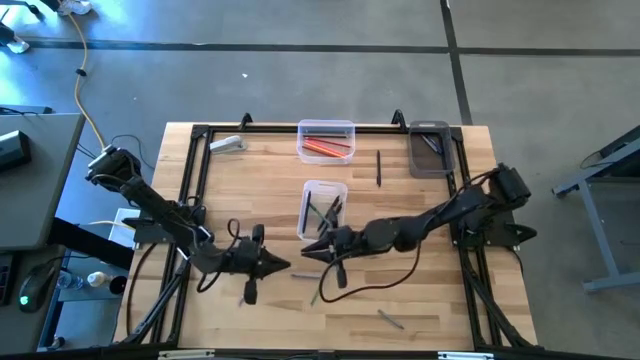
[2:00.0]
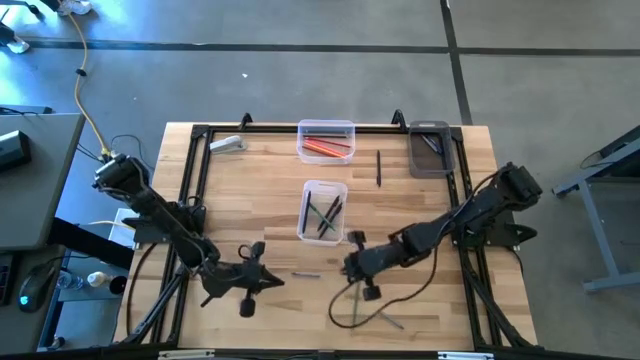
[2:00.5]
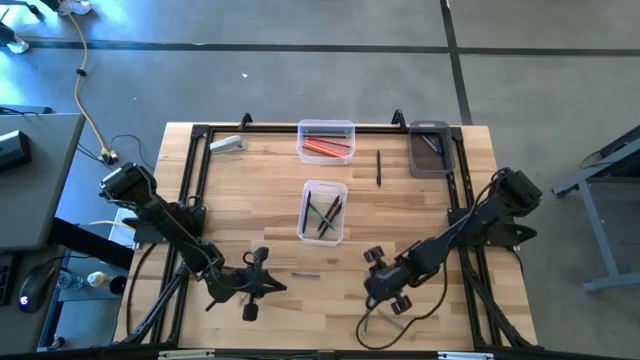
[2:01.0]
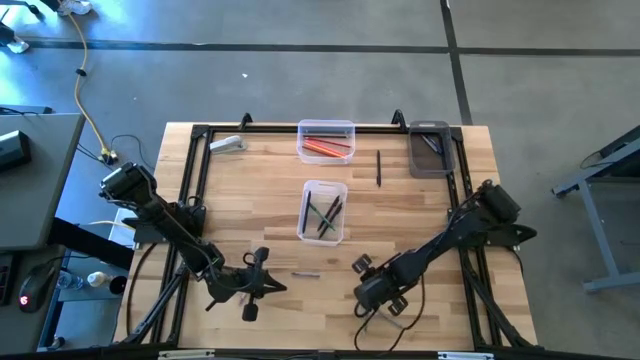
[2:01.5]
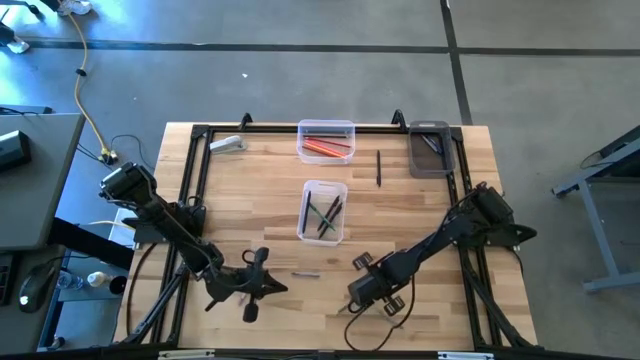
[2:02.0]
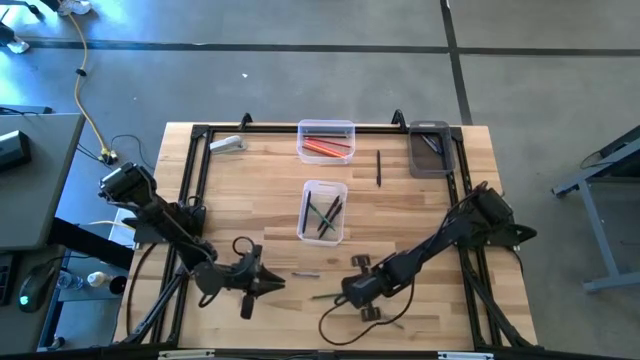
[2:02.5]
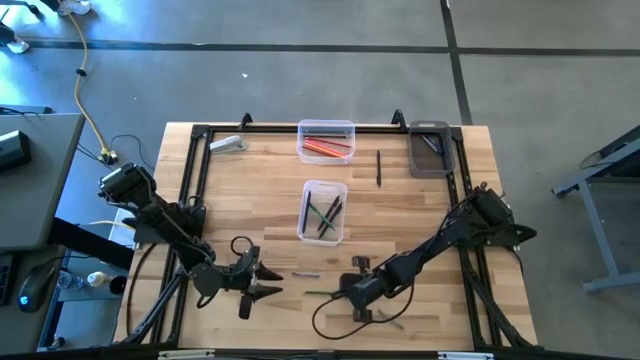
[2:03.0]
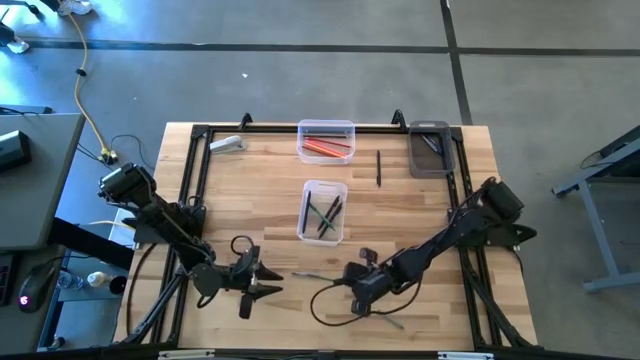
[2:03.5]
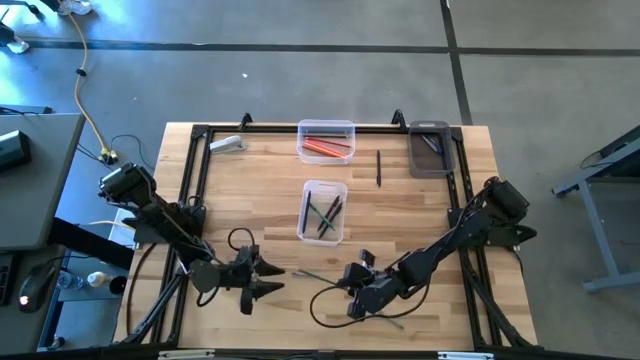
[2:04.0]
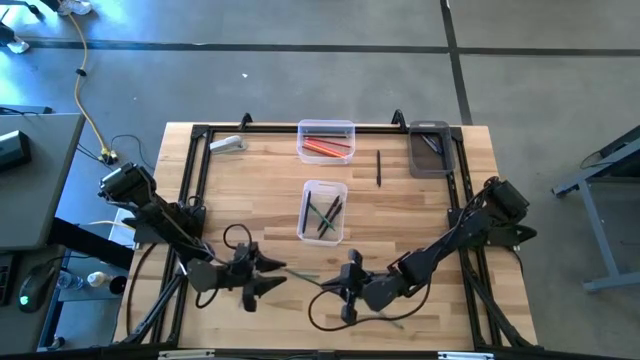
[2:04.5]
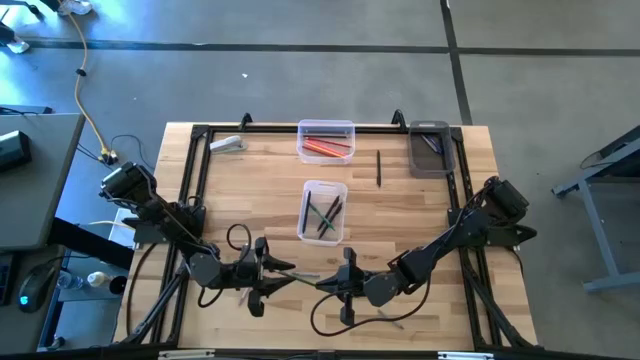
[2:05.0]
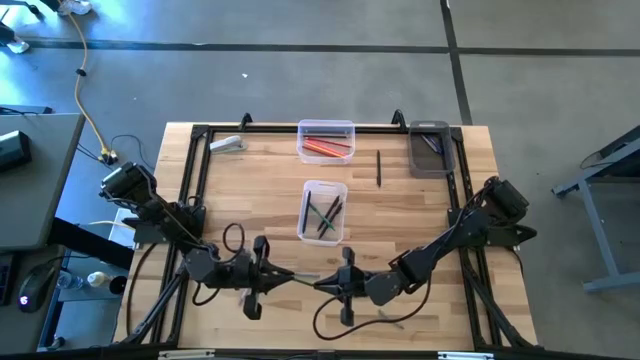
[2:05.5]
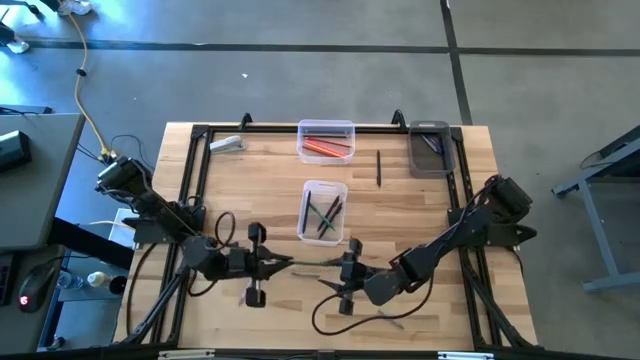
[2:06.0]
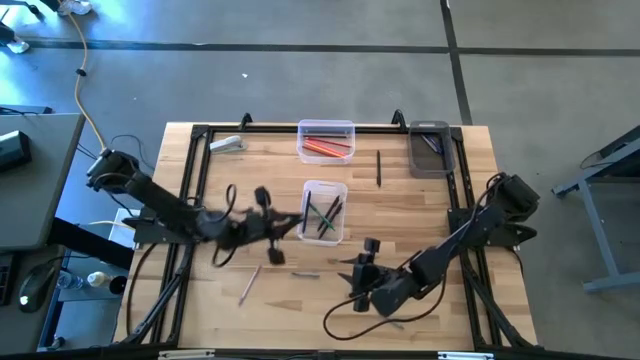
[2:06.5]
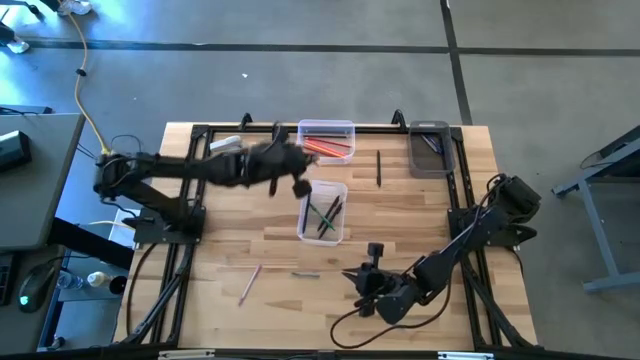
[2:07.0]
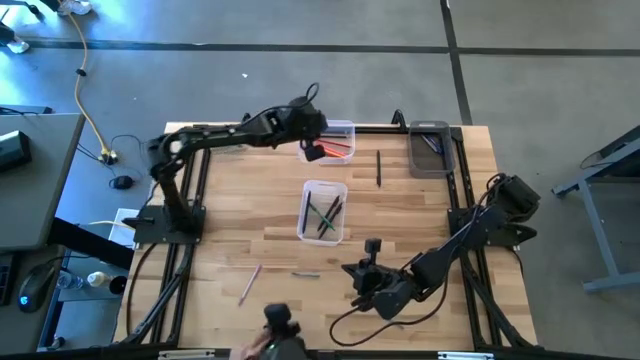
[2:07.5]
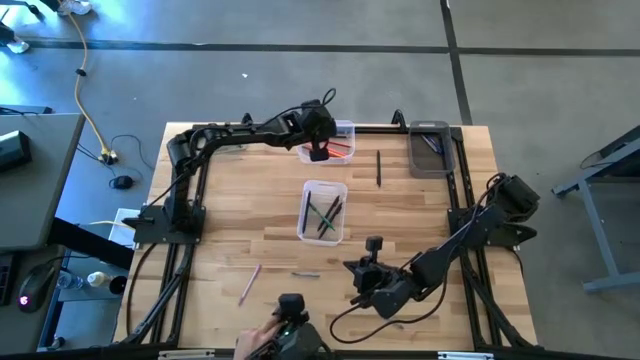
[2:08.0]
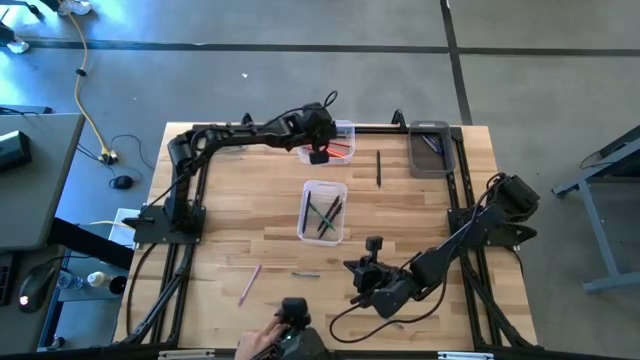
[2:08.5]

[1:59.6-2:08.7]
Task: Sort crayons/erasers/pens/pencils in bins
Put the green color pencil into the top transparent bin

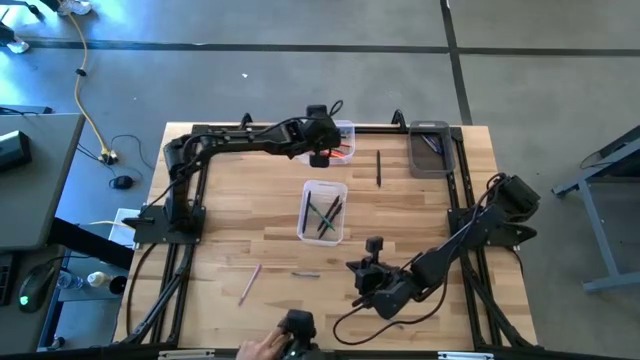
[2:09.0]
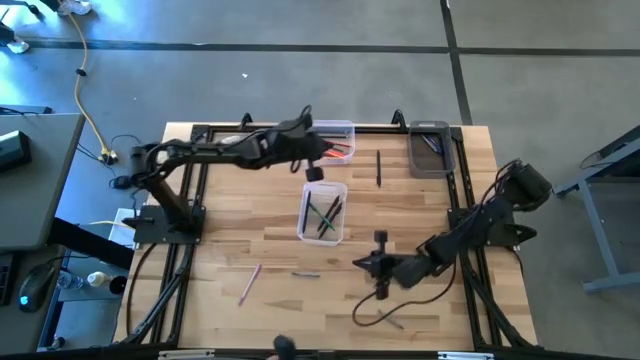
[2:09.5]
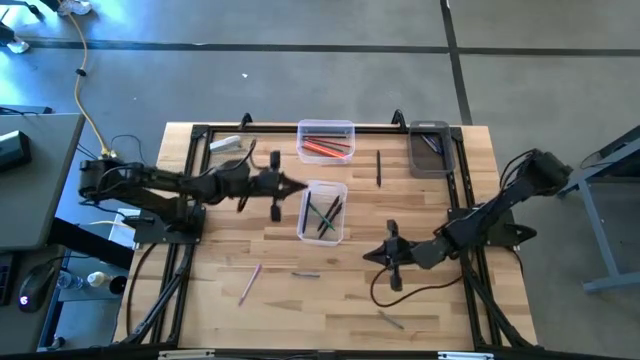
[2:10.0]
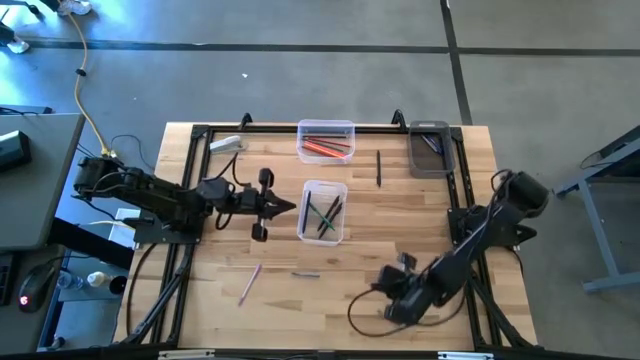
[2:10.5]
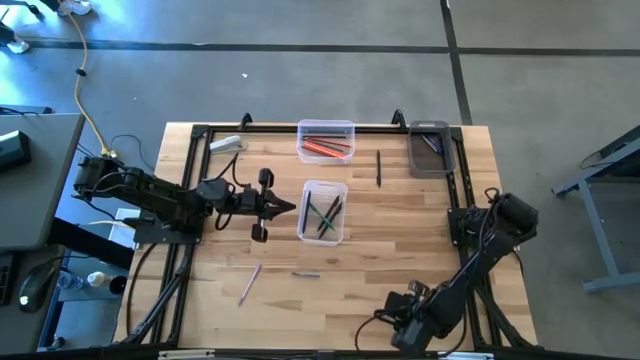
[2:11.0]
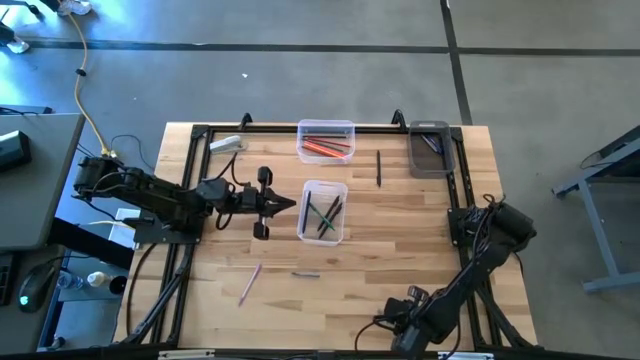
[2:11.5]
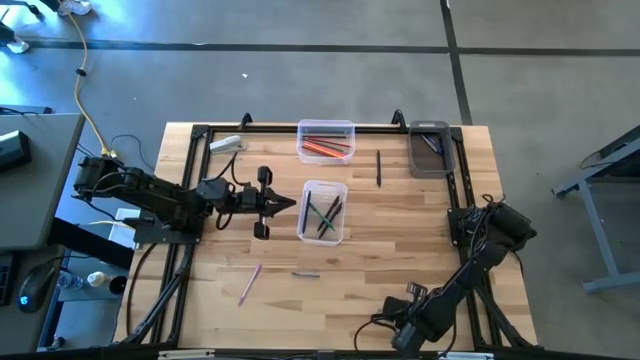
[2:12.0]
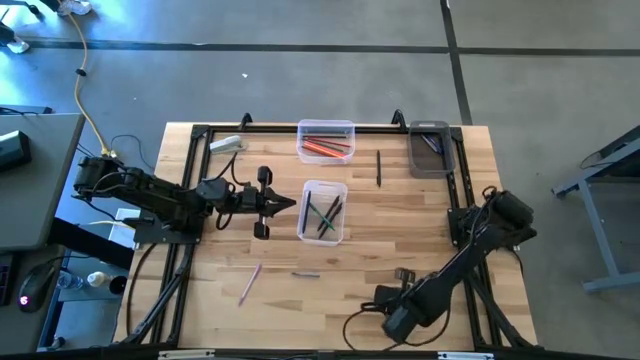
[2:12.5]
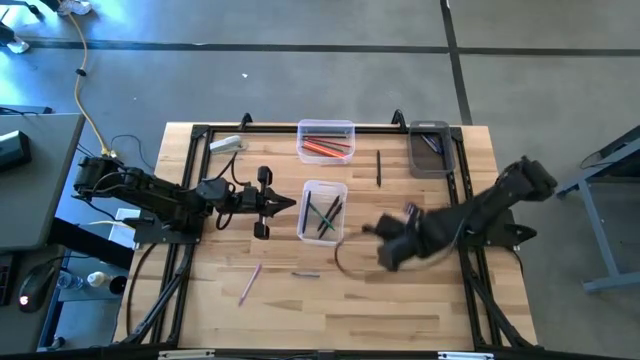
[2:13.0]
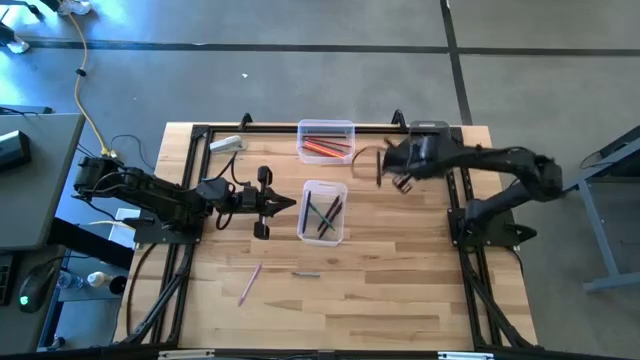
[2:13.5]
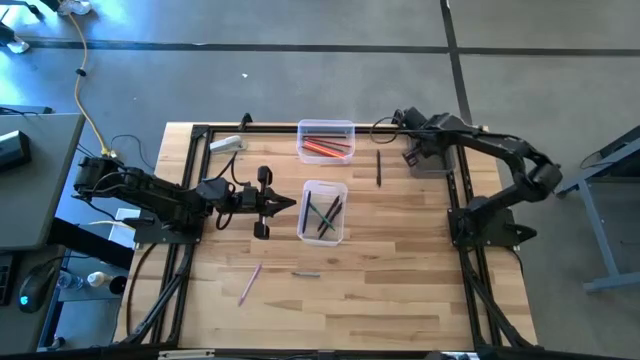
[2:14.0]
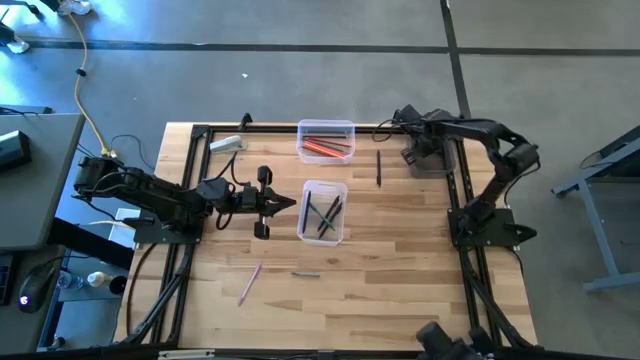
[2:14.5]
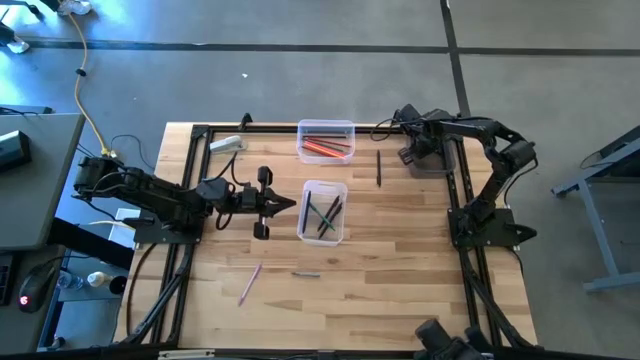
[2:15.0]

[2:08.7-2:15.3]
Put the bottom gray crayon into the transparent black bin

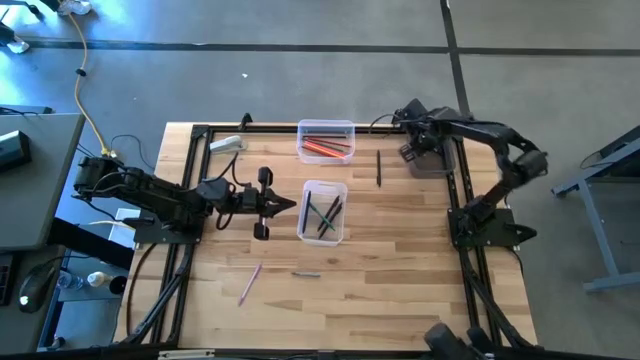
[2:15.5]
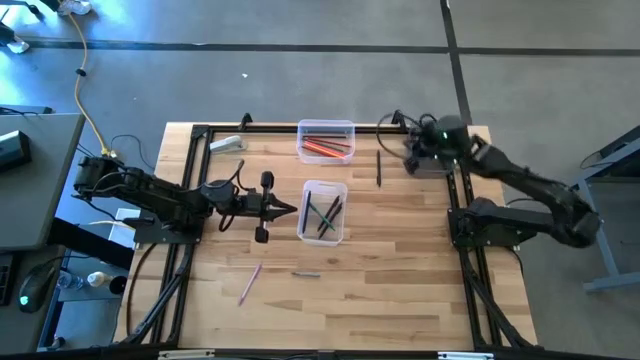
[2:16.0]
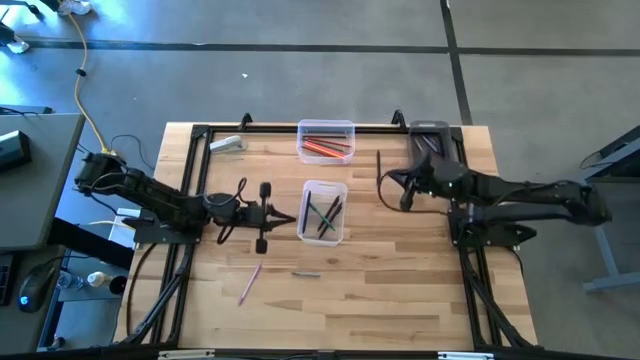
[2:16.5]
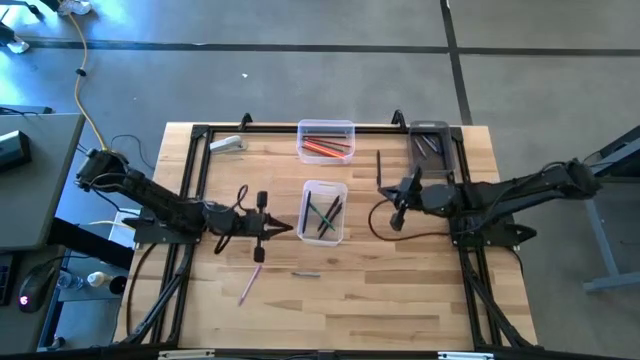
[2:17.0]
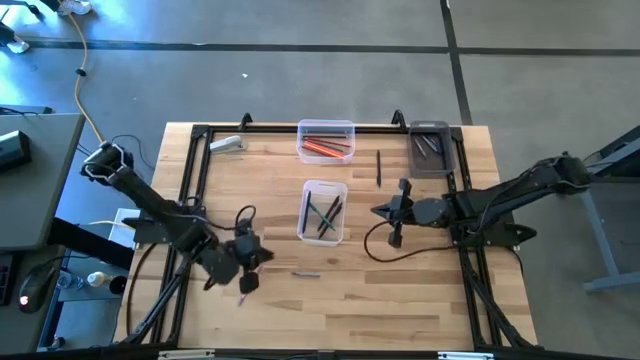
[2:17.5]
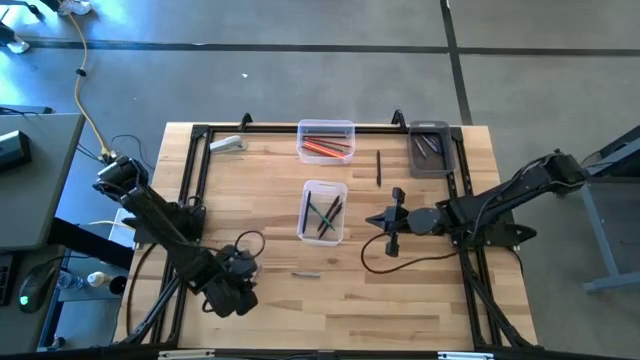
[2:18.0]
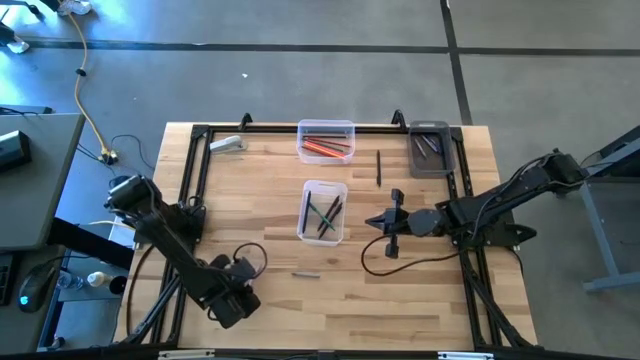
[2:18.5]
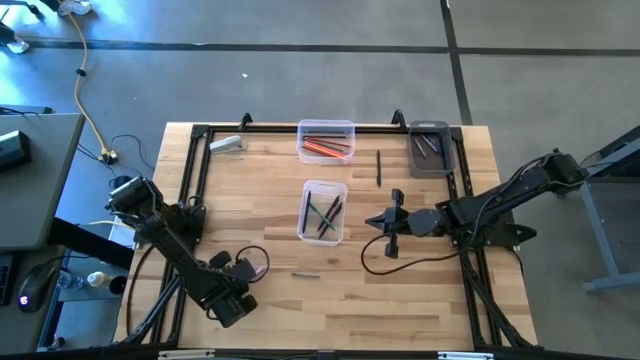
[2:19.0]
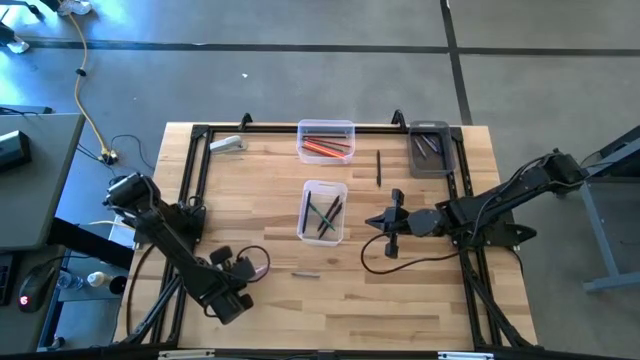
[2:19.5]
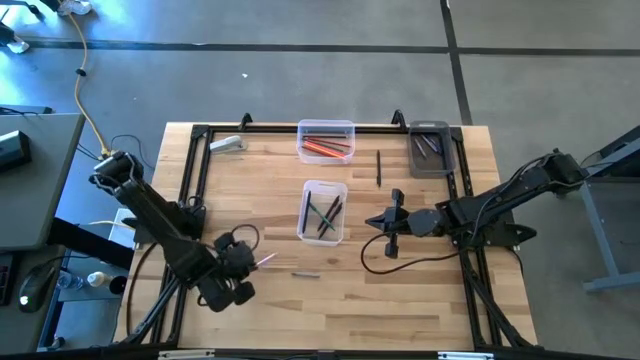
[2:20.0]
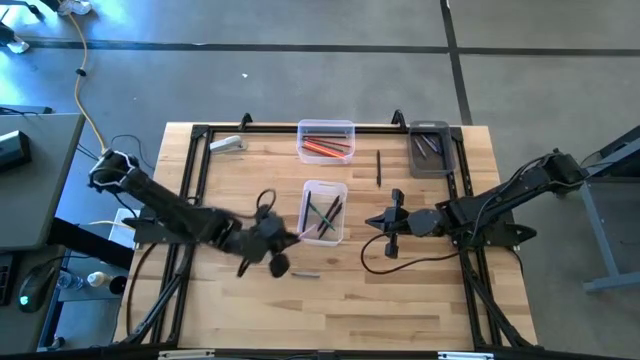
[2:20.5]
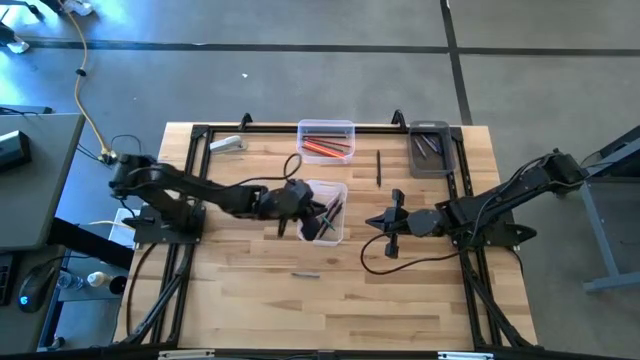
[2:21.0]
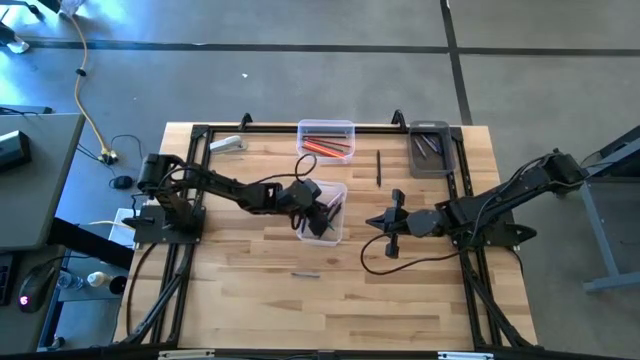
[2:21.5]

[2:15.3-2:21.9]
Put the purple pen into the bottom transparent bin

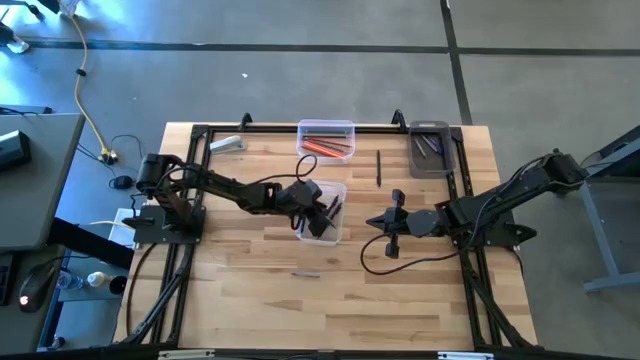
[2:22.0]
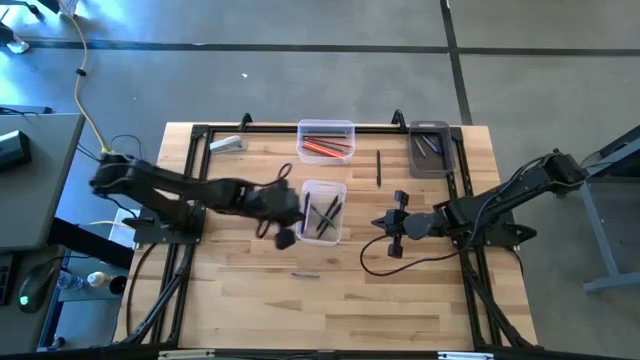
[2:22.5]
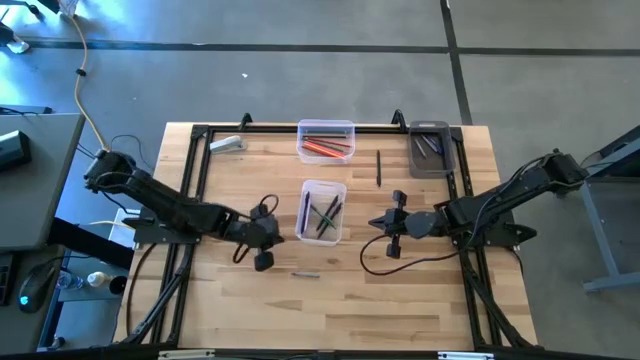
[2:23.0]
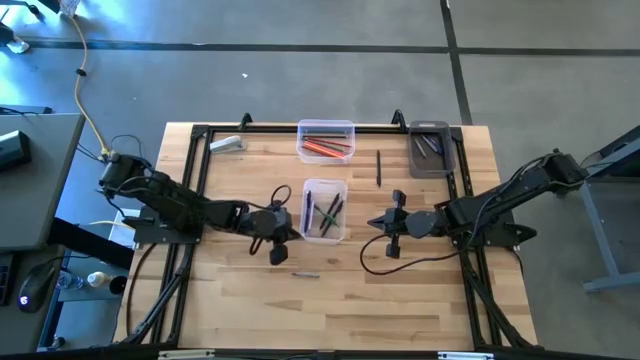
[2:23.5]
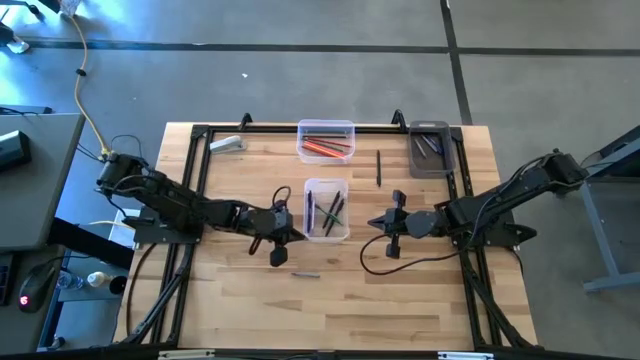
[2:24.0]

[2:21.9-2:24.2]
Adjust the bottom transparent bin
